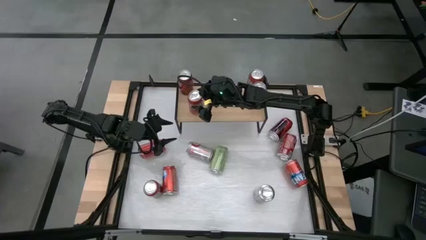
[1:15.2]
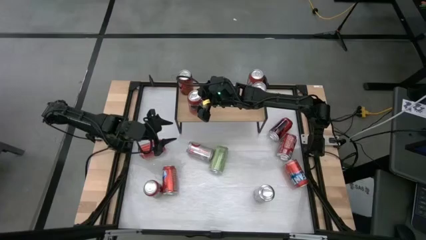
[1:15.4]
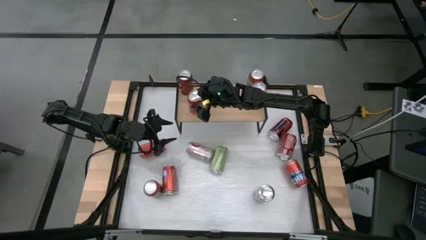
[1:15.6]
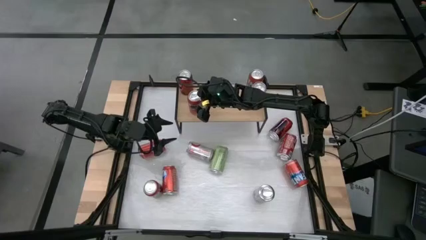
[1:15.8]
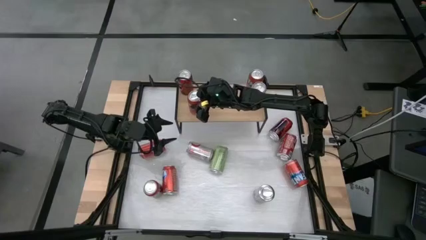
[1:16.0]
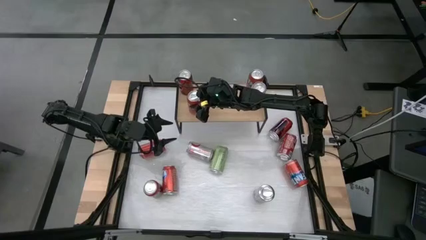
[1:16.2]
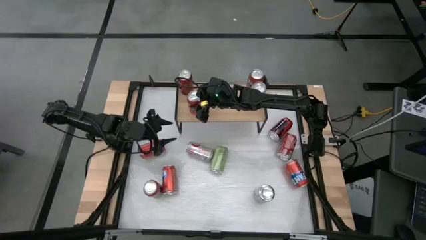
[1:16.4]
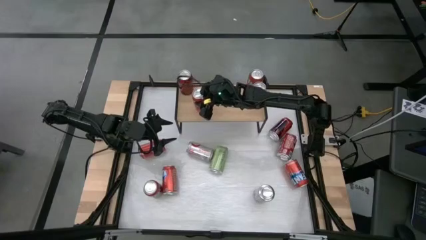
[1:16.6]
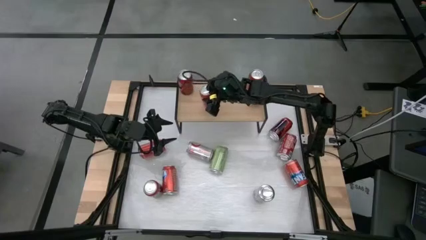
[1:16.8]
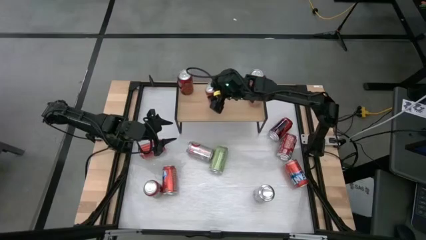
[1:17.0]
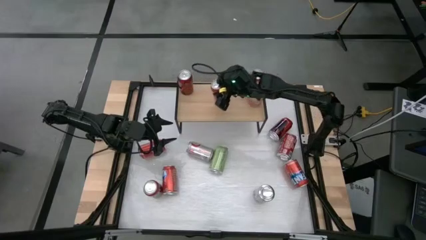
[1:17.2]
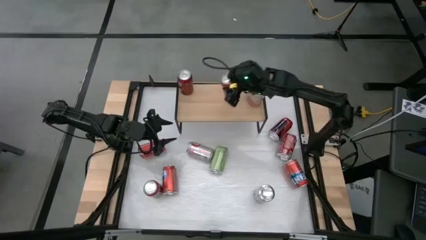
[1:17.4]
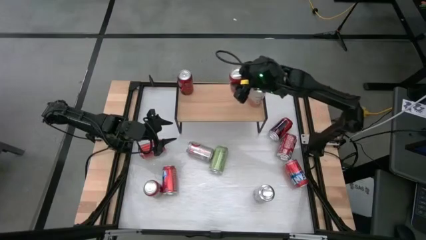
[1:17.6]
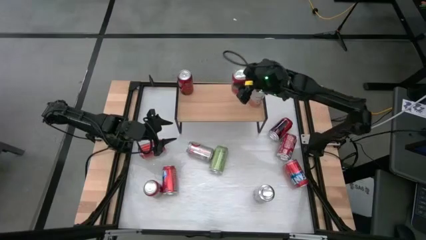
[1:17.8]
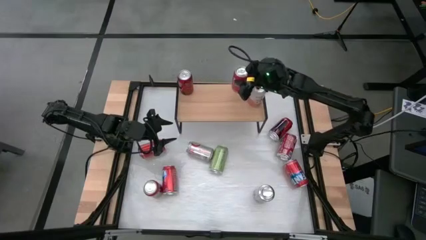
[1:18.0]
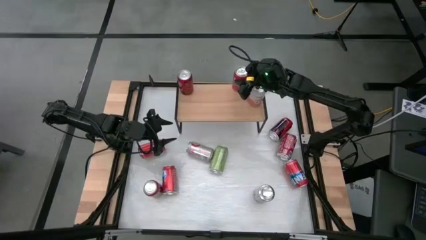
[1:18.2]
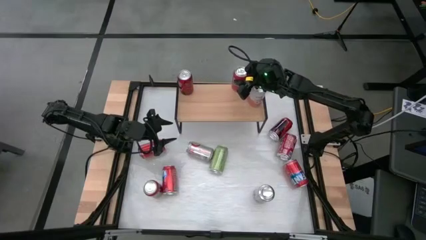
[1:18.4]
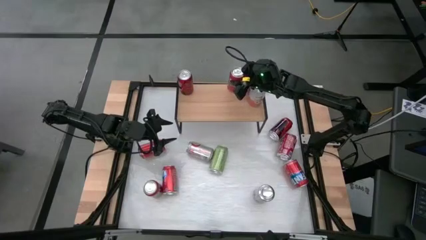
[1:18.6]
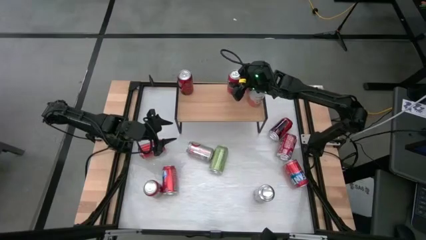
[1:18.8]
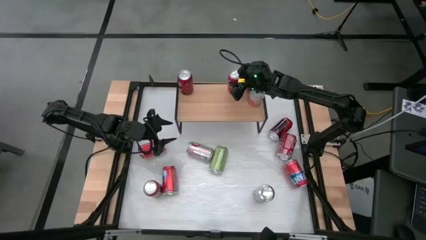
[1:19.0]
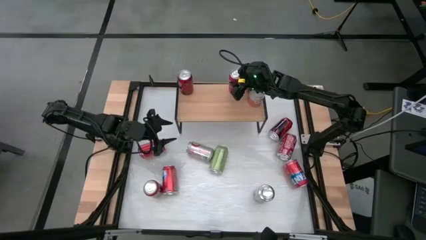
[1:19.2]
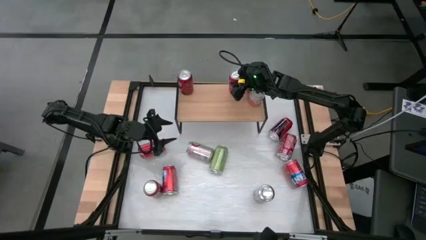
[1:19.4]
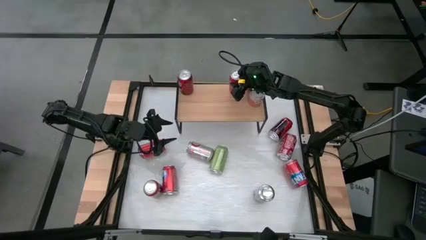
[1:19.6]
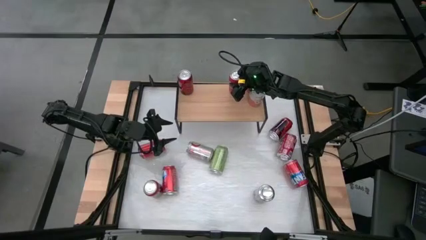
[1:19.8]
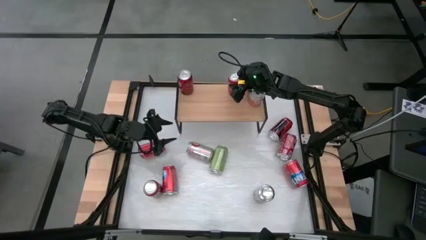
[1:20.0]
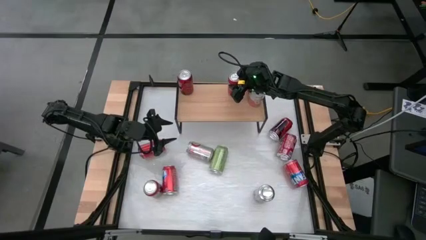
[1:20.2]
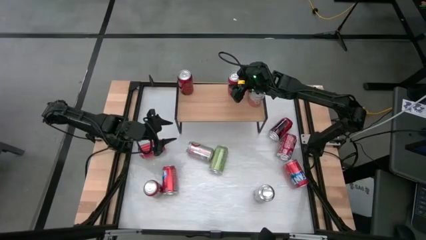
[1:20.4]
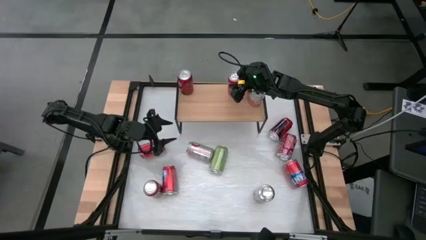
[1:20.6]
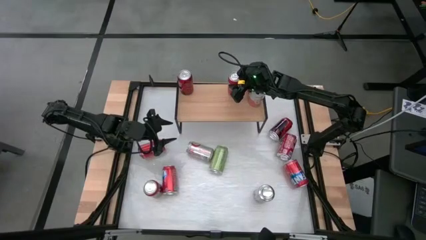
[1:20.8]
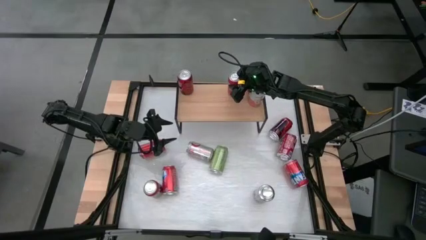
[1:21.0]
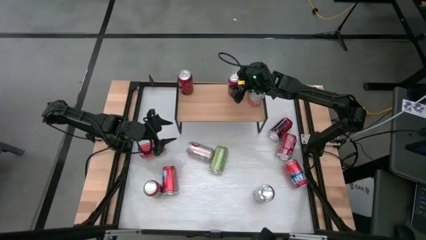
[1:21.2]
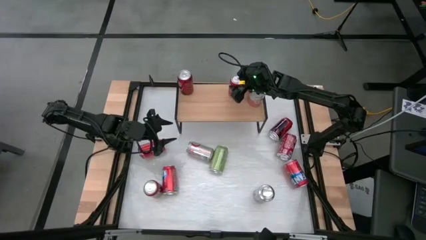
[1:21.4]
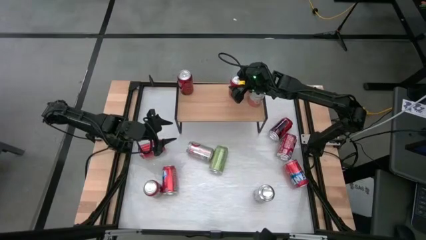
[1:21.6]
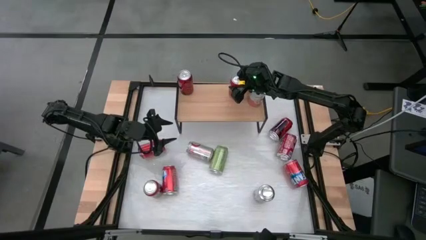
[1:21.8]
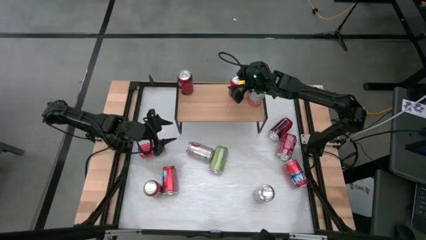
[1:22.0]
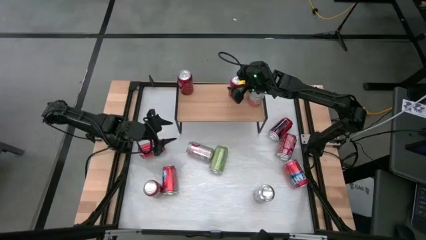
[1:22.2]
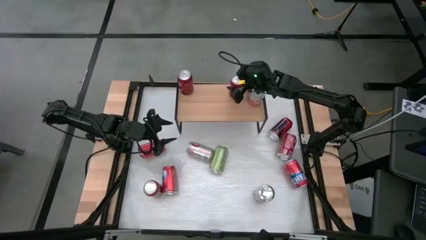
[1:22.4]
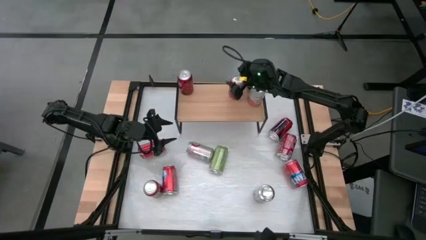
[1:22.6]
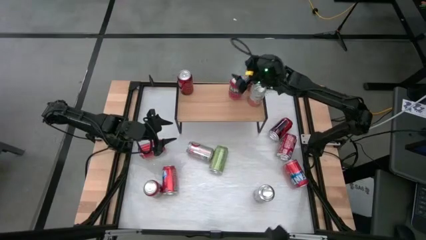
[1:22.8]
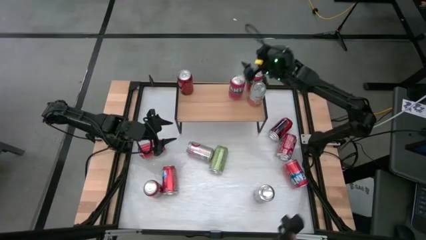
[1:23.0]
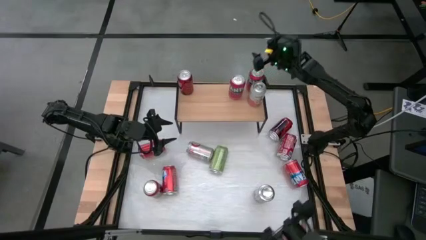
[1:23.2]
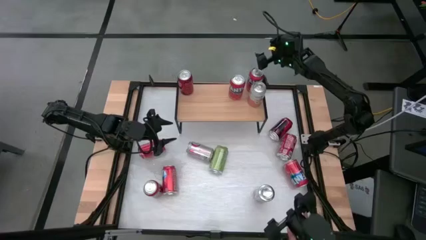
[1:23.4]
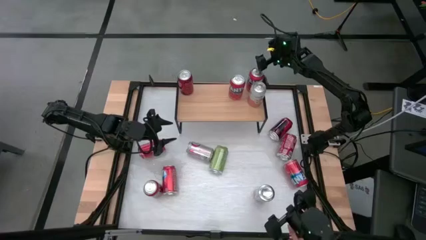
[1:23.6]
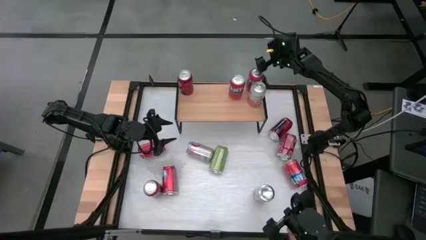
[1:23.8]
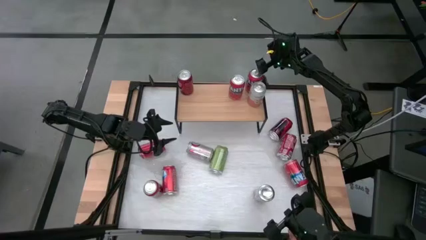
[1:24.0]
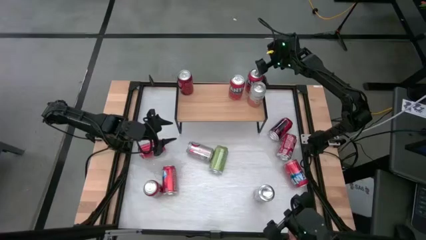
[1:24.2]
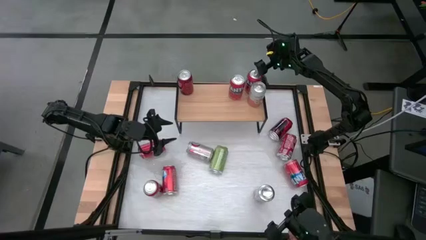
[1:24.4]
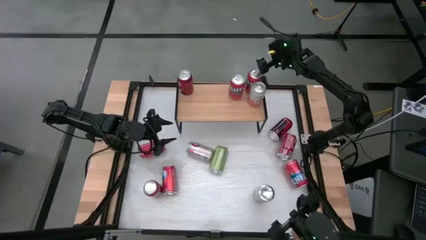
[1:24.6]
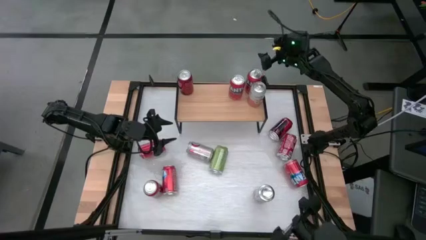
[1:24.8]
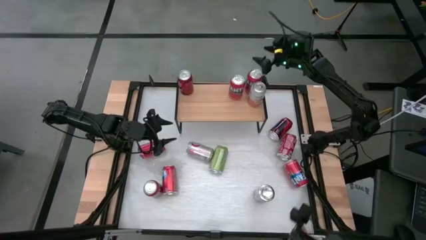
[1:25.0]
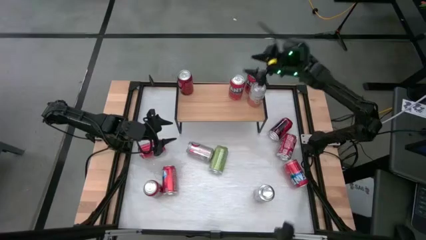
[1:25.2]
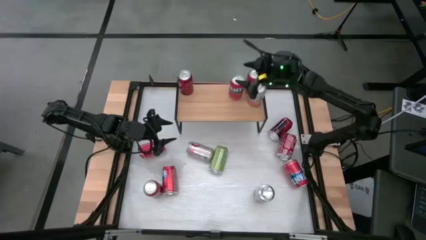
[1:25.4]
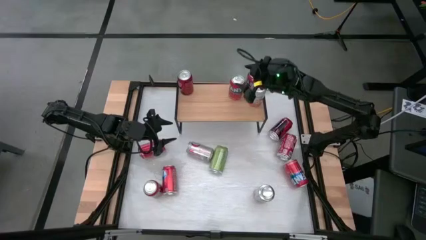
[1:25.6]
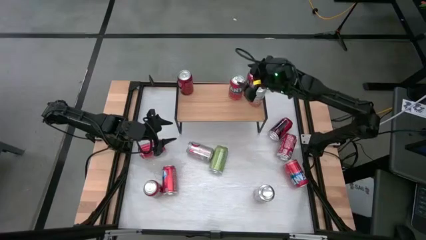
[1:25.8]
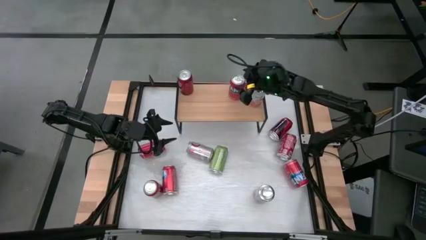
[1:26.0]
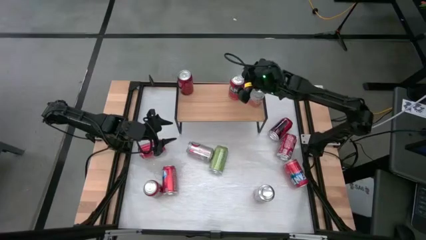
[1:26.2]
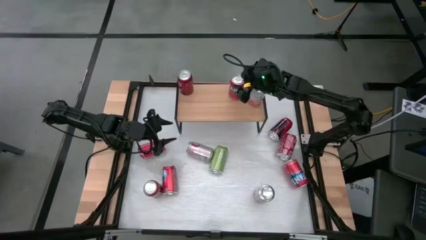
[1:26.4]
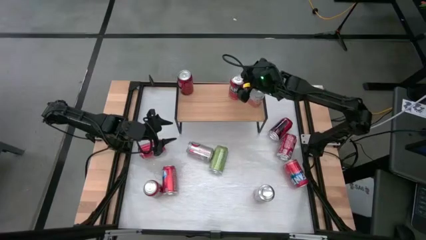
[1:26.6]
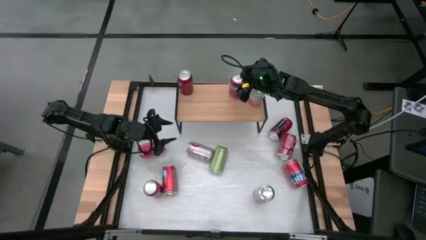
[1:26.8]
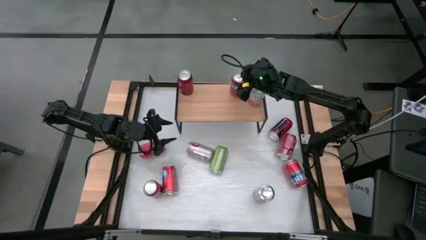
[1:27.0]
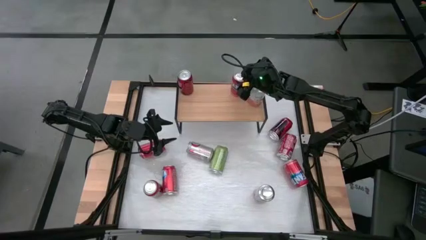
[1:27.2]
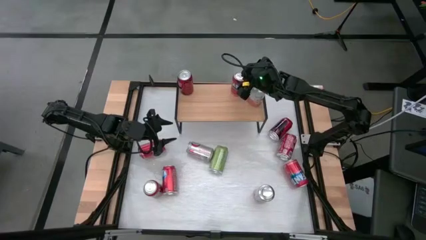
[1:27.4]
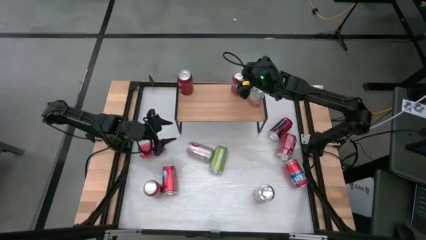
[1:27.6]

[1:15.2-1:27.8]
Task: Place canned beverage on shelf
Put the orange soda can on the shelf aligned with the other orange soda can
